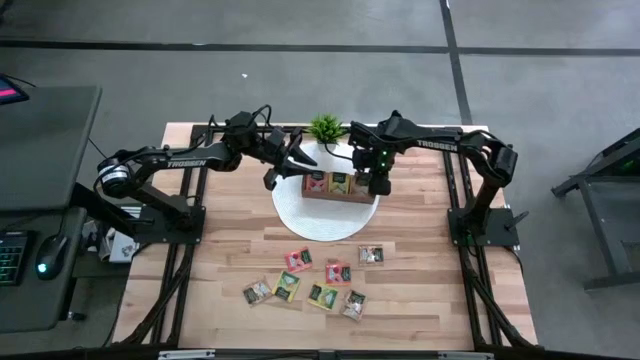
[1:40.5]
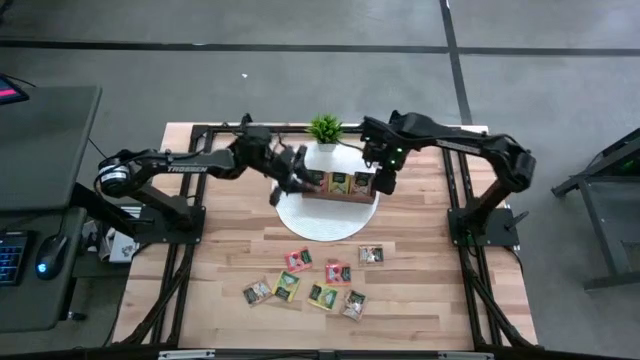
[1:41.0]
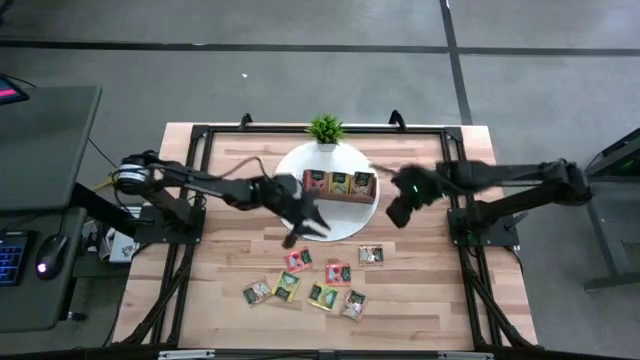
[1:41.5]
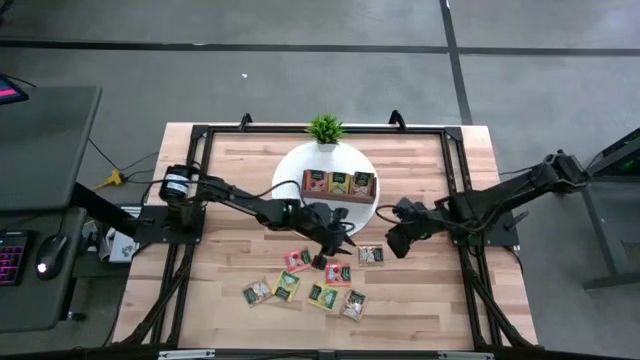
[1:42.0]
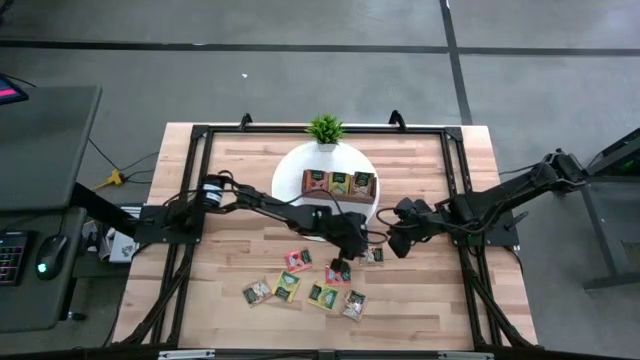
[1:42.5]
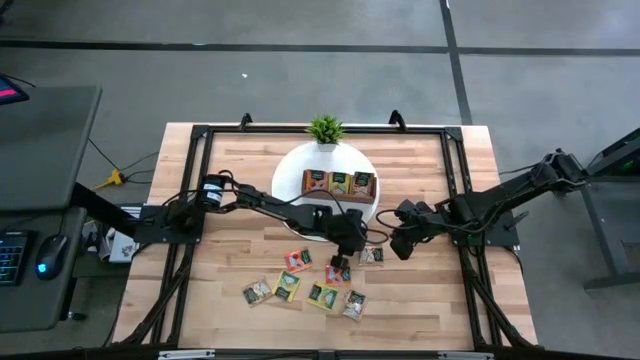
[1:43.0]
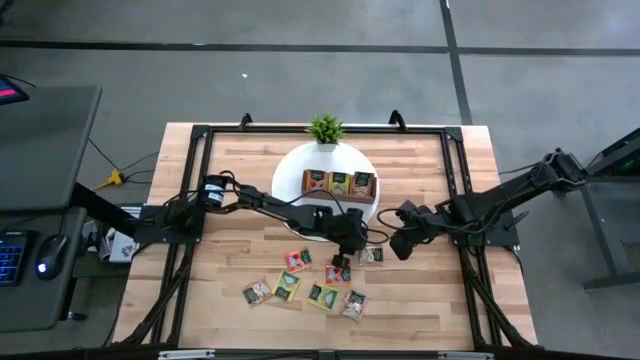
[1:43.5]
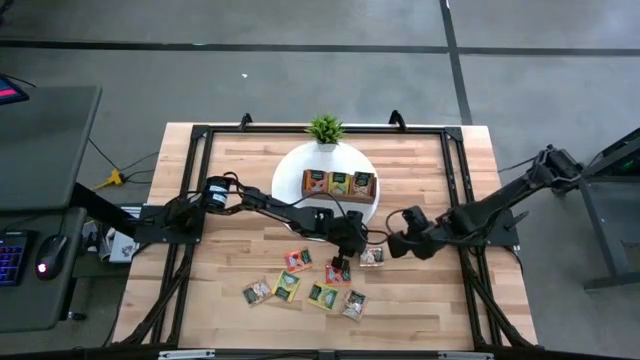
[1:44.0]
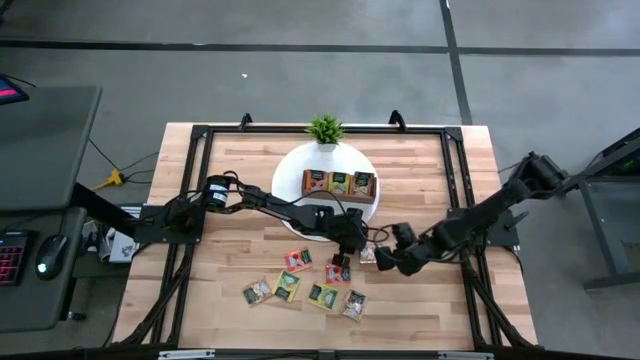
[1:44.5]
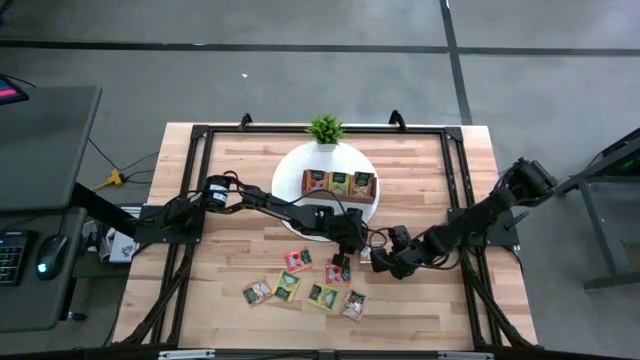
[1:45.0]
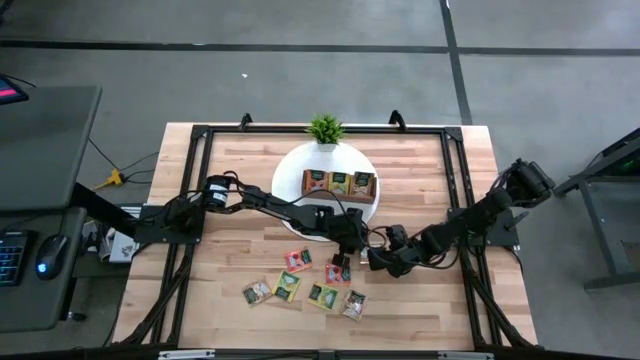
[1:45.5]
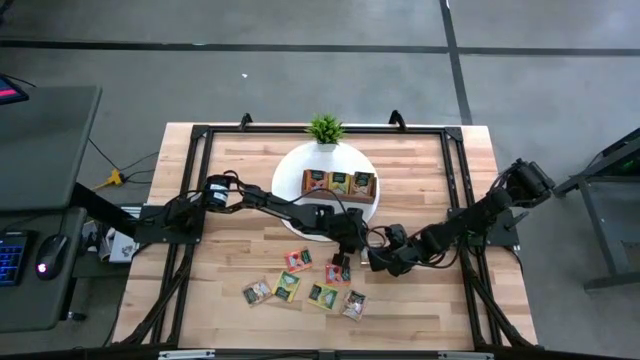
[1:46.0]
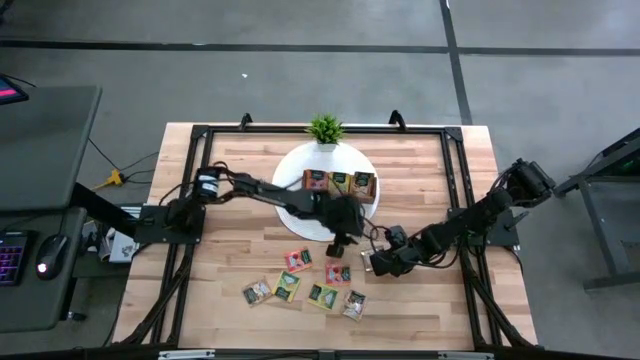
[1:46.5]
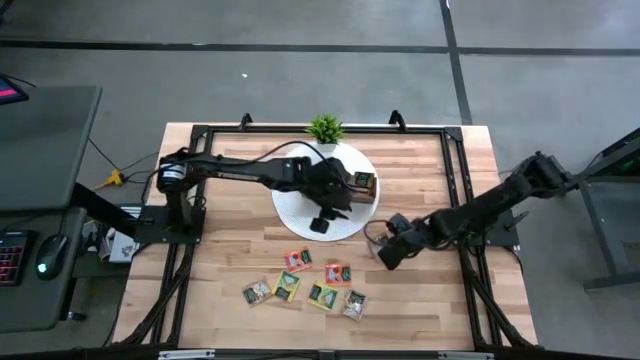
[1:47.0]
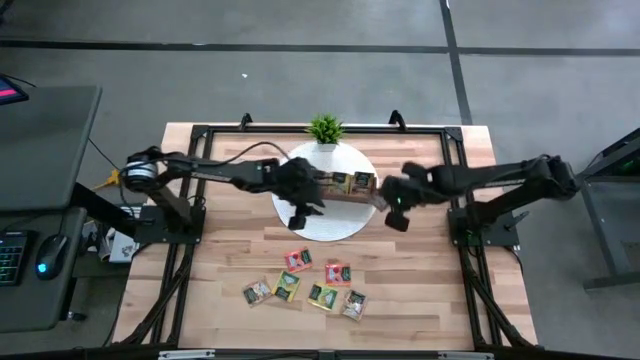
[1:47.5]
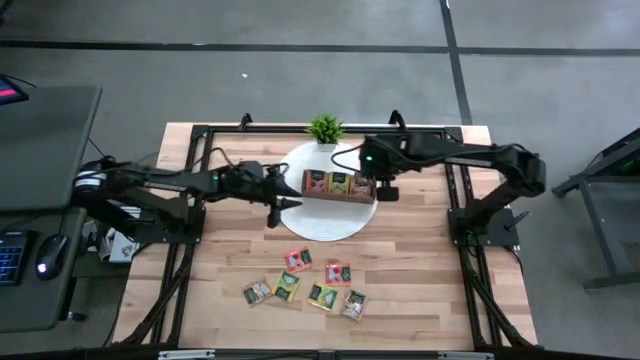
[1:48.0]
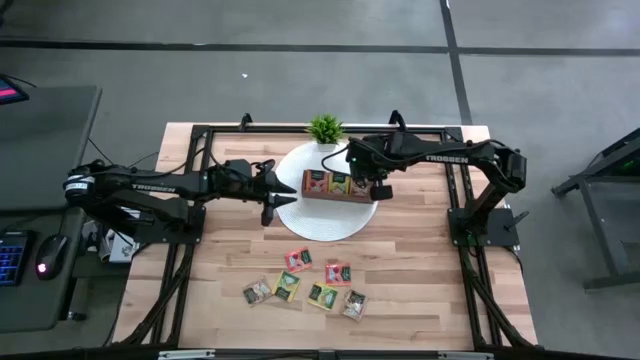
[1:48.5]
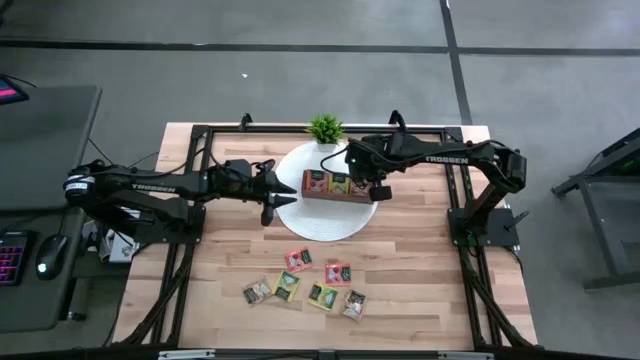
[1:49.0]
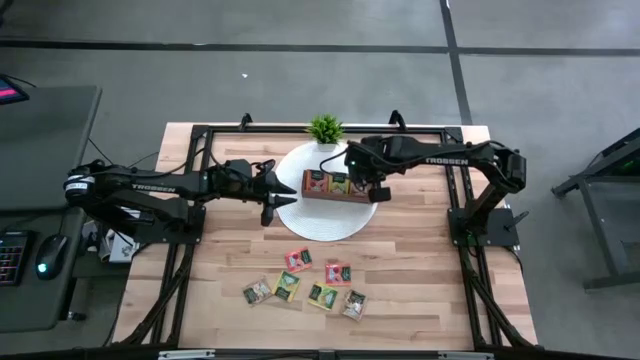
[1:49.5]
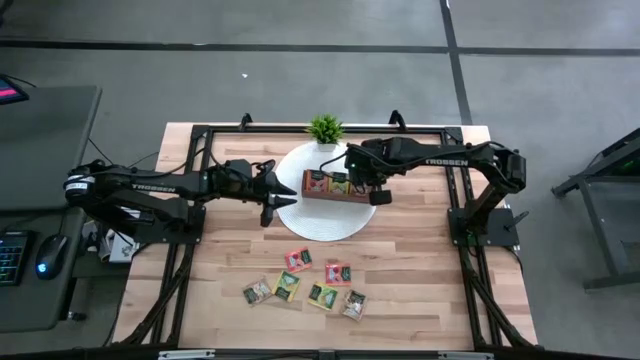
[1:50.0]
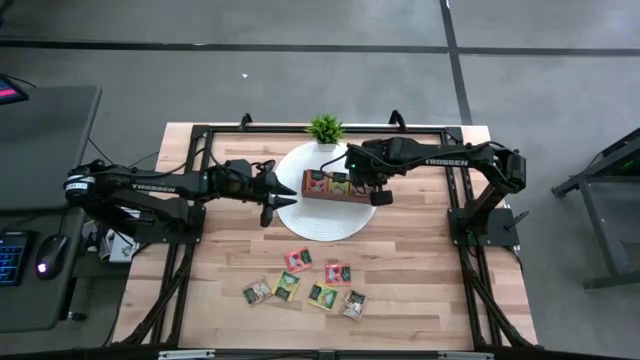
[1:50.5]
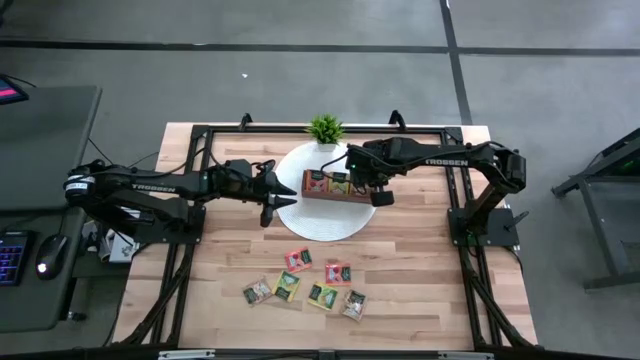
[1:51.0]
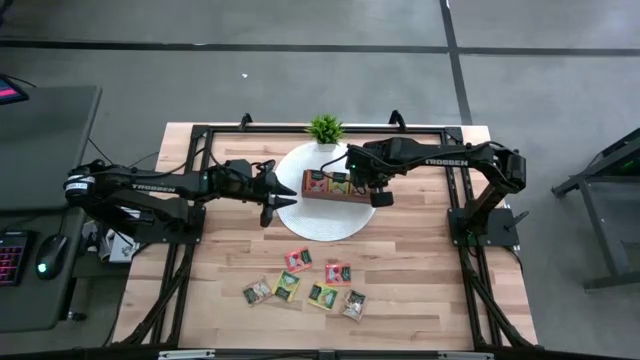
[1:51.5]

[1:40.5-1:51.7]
Task: Pick & Place Tea
Put the brown tea bag into the right section of the wooden organizer

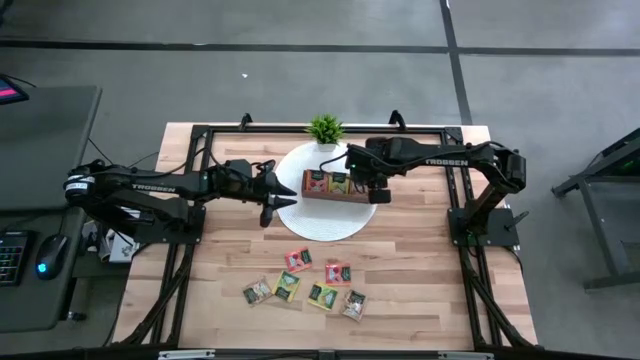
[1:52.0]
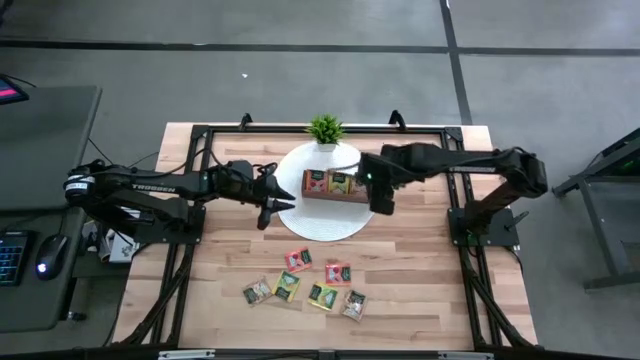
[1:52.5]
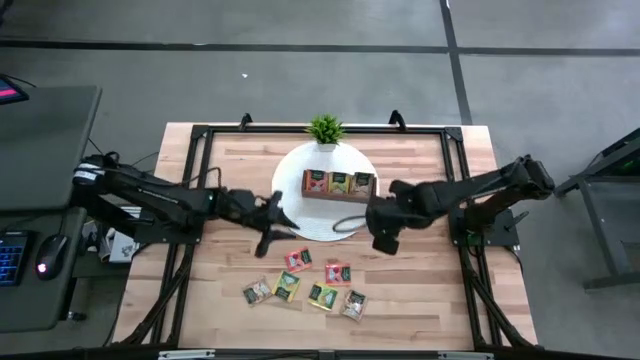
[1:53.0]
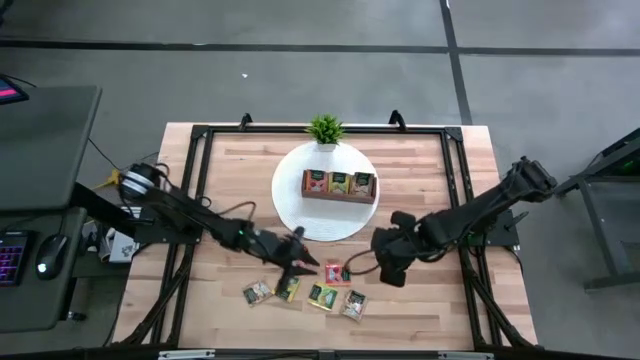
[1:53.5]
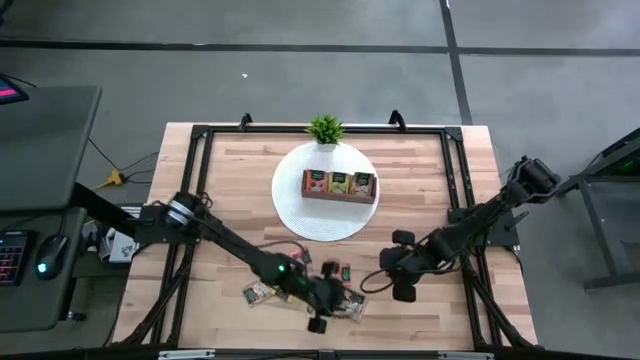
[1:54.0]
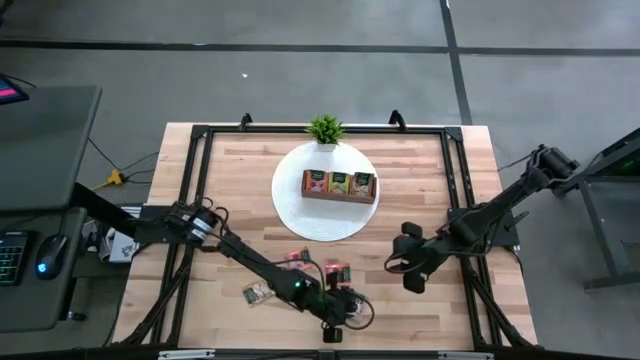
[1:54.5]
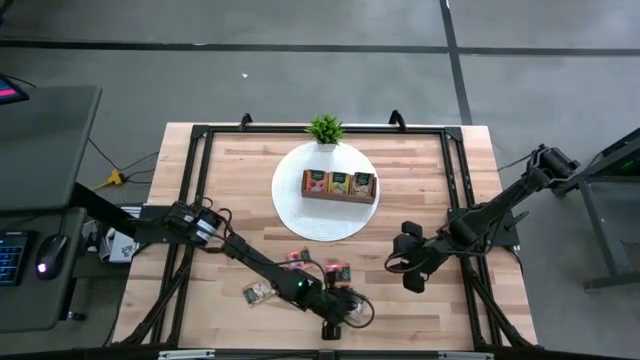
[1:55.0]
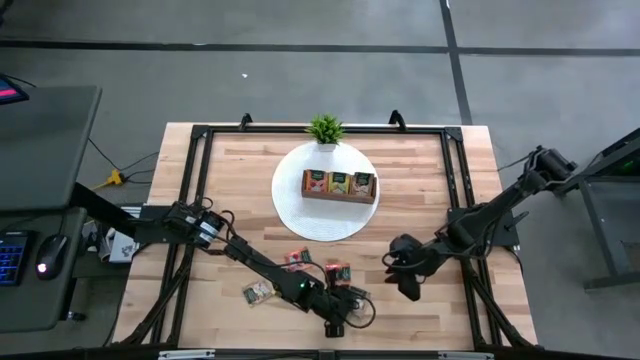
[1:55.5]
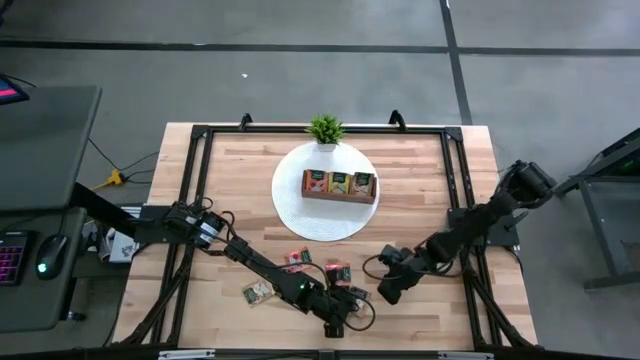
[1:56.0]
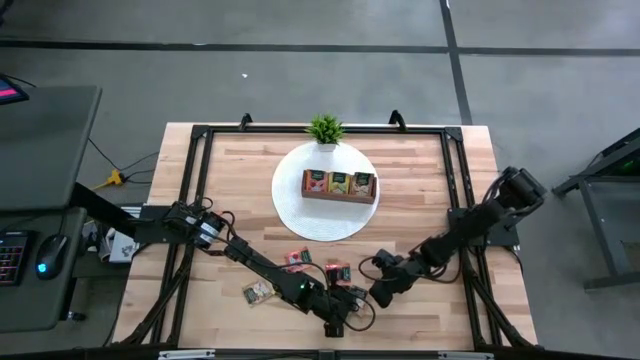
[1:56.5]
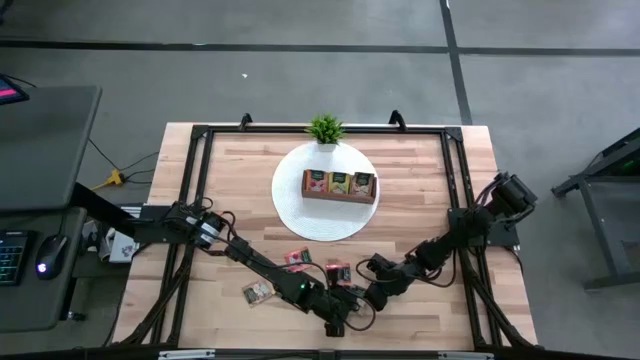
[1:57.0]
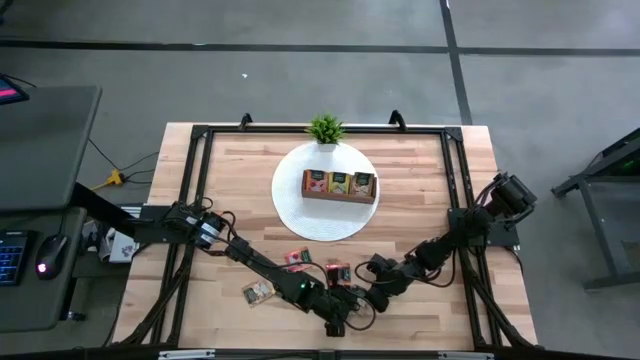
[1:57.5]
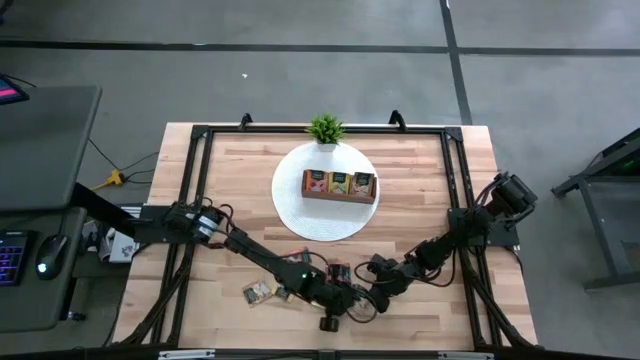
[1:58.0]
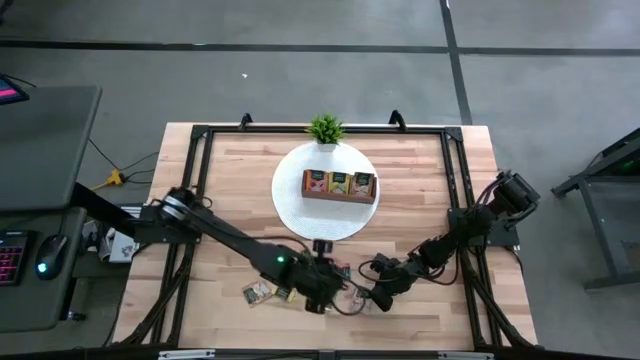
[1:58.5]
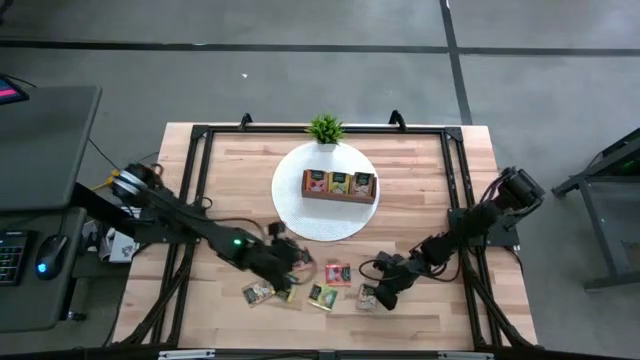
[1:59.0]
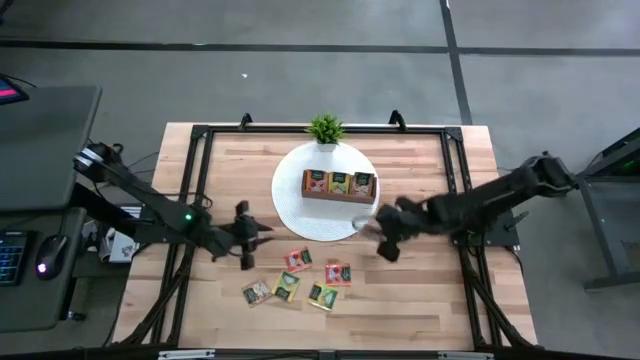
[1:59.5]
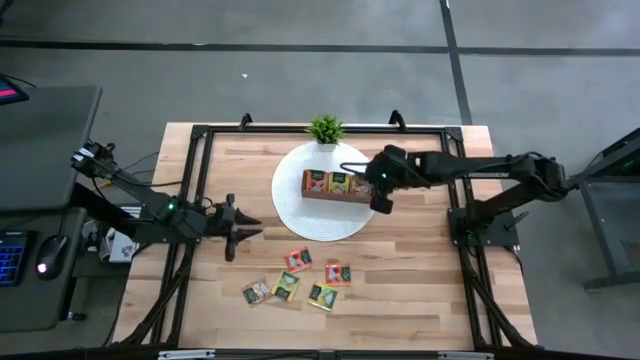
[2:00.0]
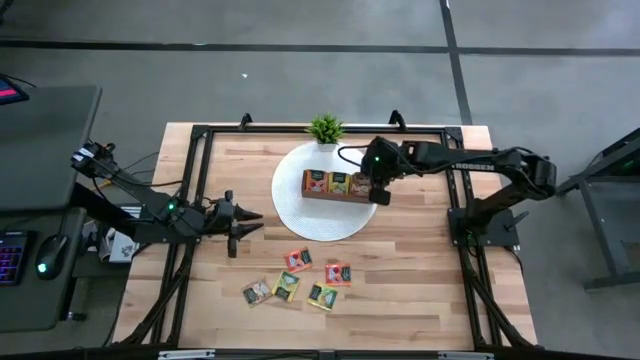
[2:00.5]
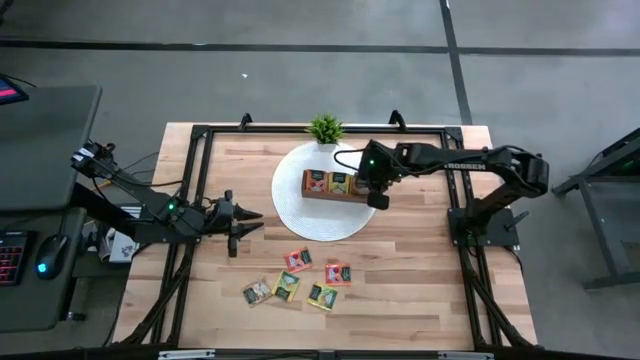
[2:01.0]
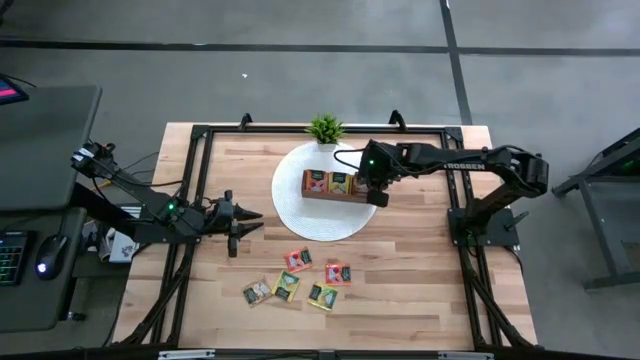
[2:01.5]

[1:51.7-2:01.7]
Put the brown tea bag into the right section of the wooden organizer

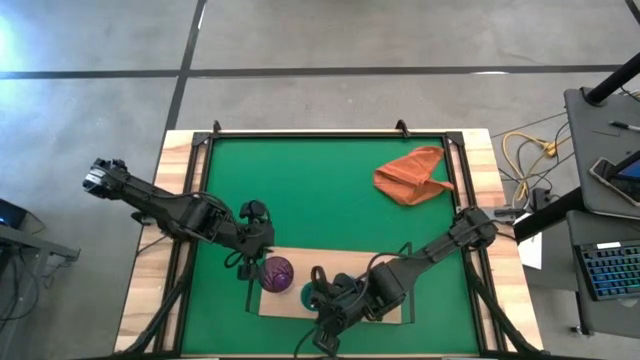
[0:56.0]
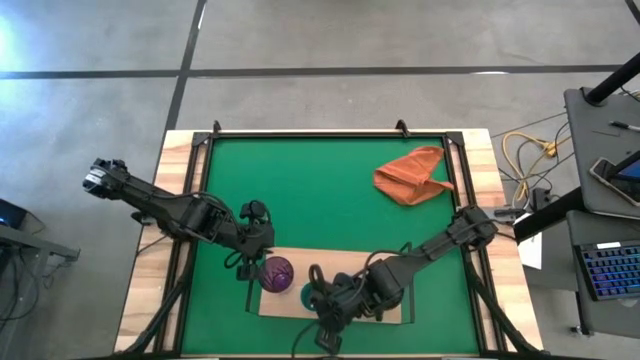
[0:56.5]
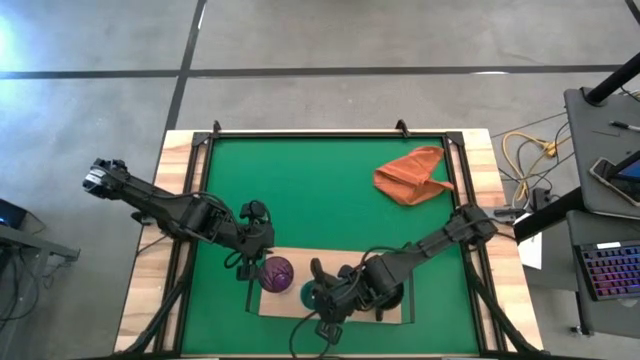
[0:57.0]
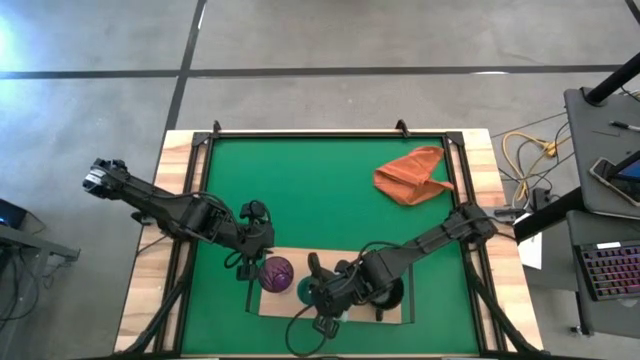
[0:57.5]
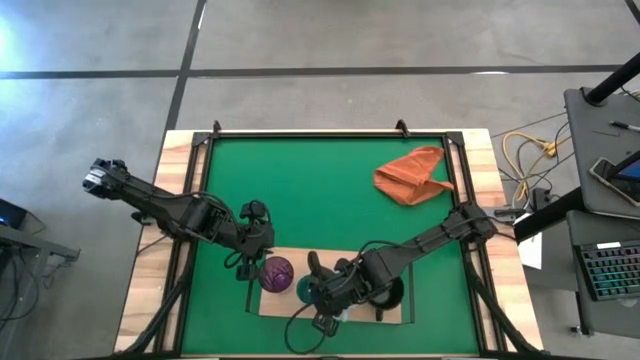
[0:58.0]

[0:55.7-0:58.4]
Task: Stack small to large cups/mugs on shelf
Adjust the green cup
